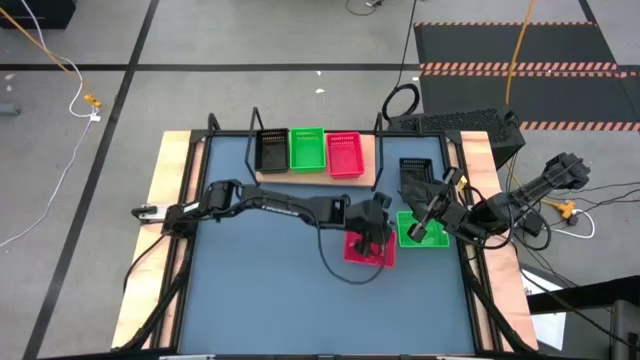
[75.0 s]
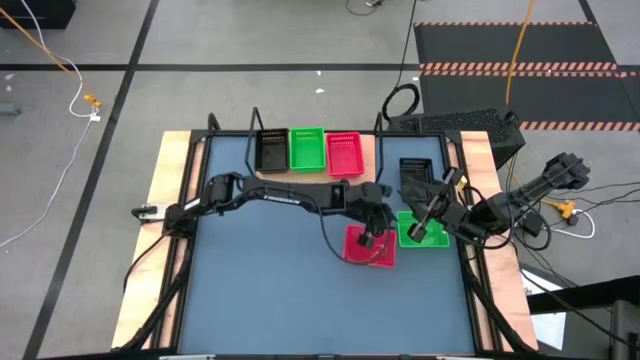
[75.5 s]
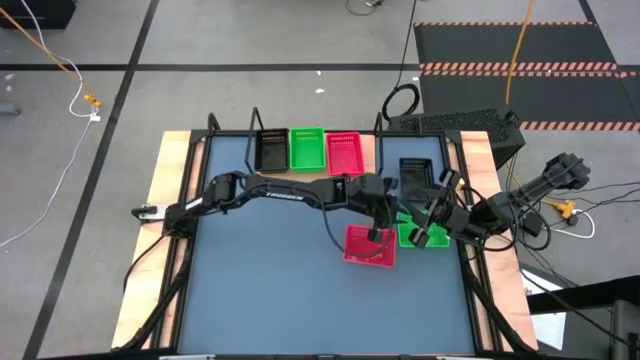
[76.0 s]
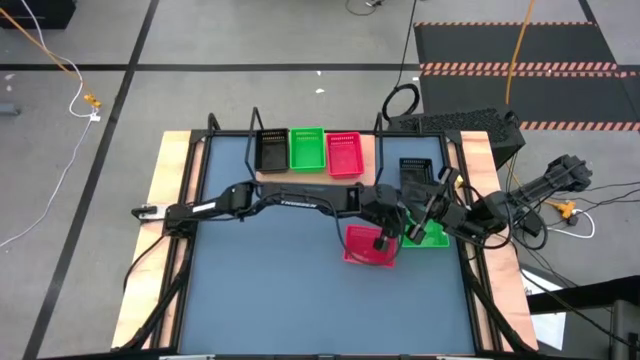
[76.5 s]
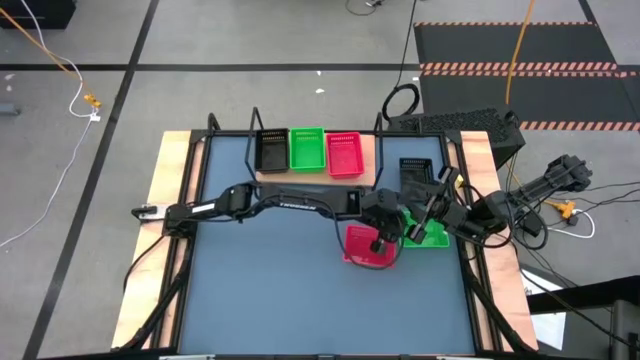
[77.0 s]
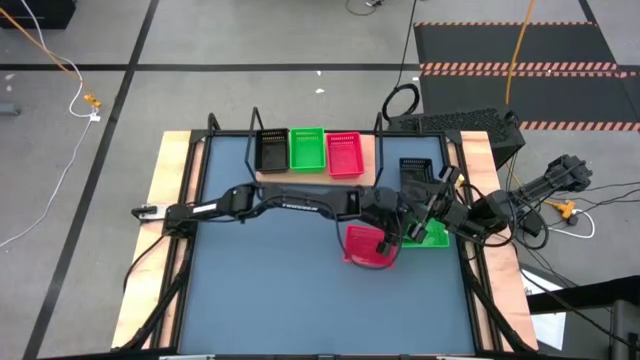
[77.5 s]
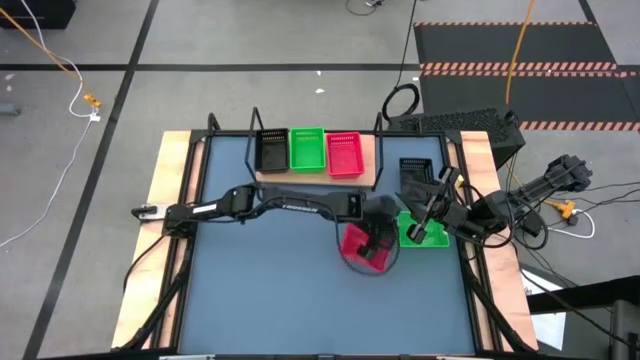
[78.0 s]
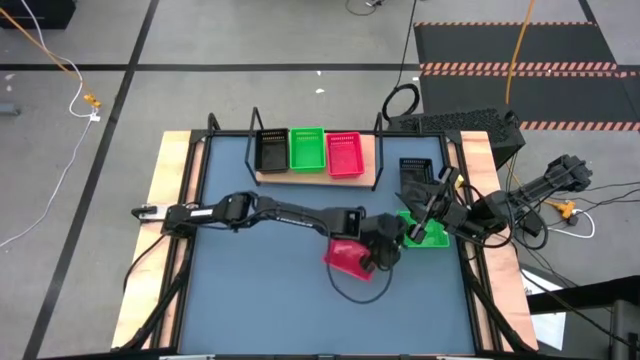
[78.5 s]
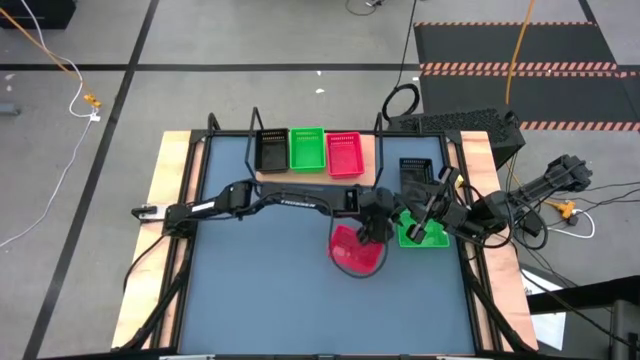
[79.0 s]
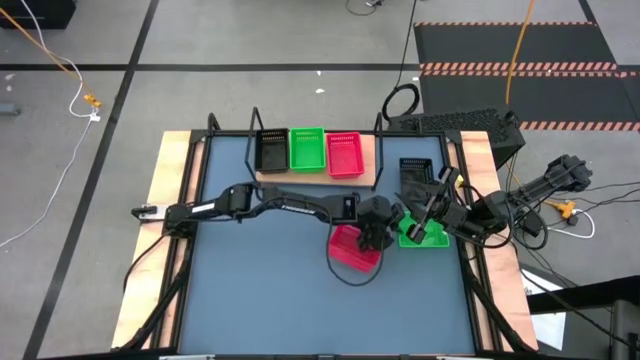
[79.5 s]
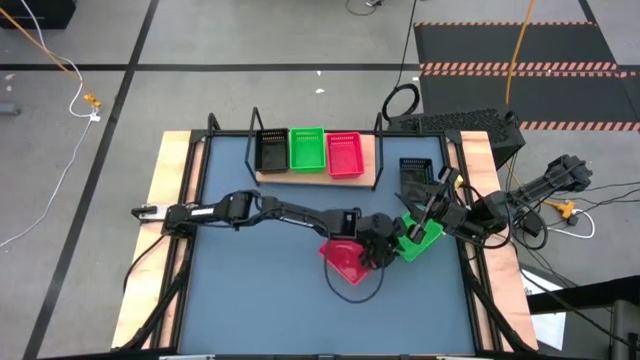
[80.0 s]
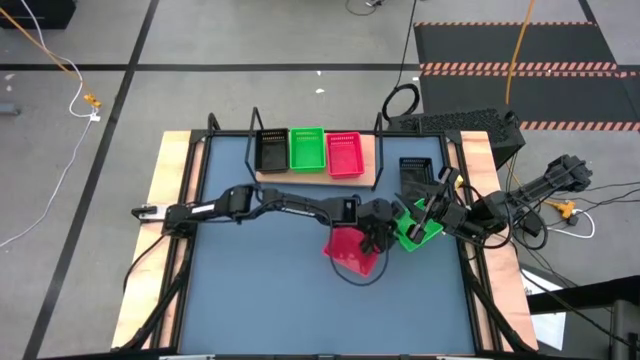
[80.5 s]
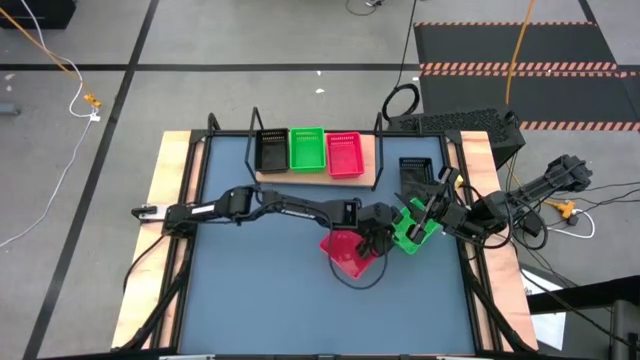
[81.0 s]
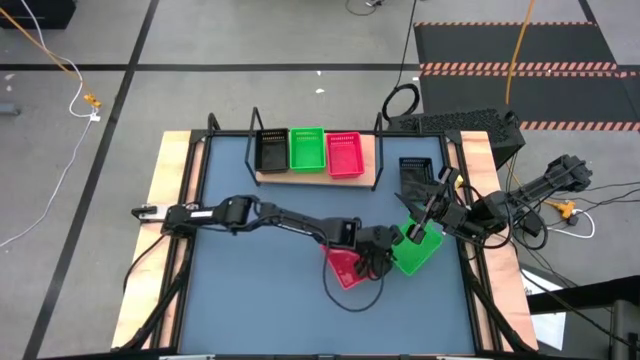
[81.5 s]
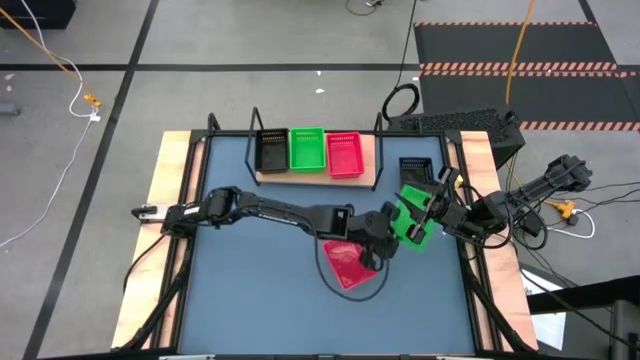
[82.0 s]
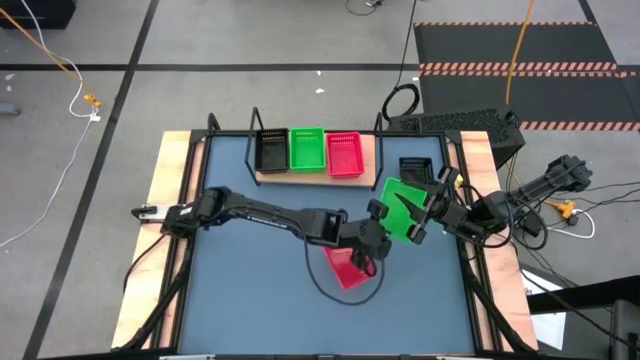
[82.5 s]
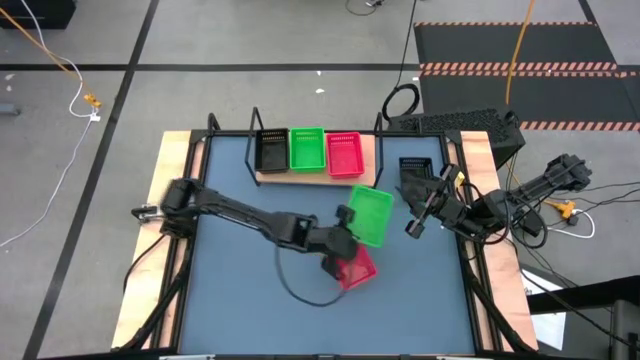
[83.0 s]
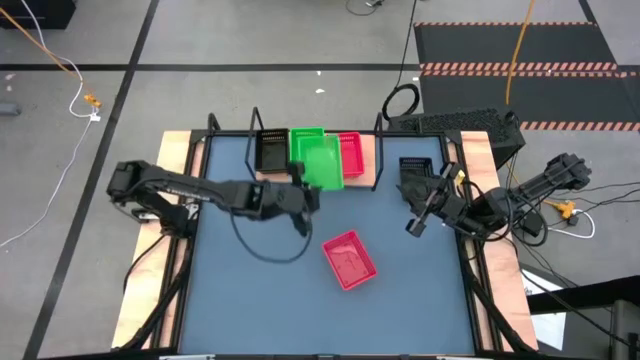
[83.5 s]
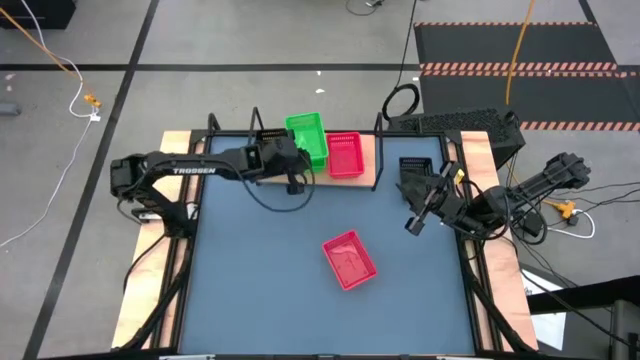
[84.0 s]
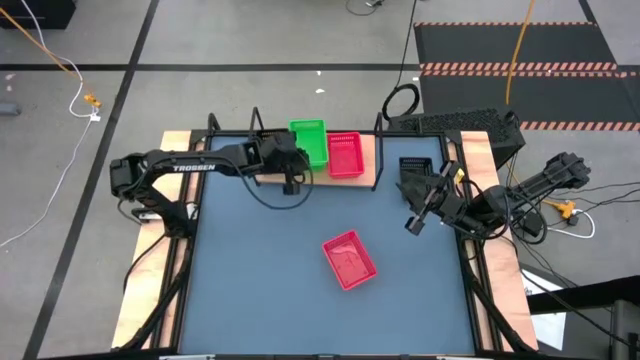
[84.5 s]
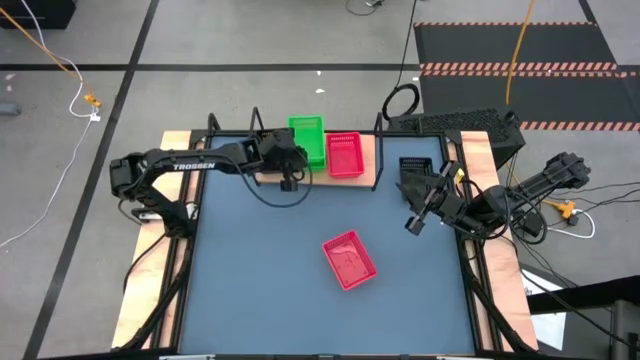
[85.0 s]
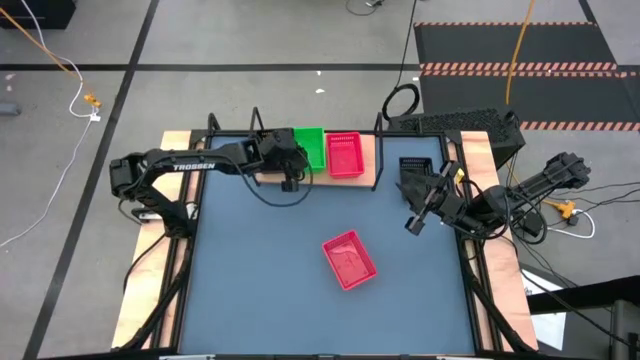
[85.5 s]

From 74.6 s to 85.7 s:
Task: Stack baskets on shelf by color
Stack the green bin on top of the green bins on the shelf

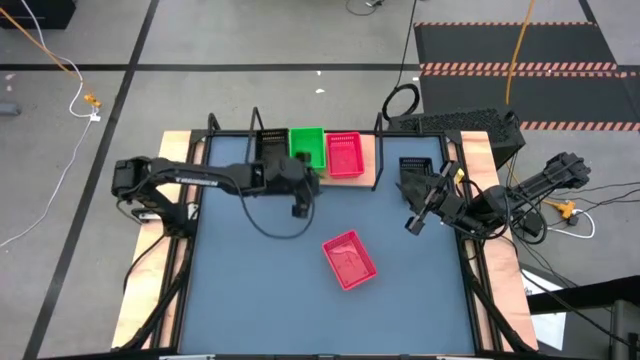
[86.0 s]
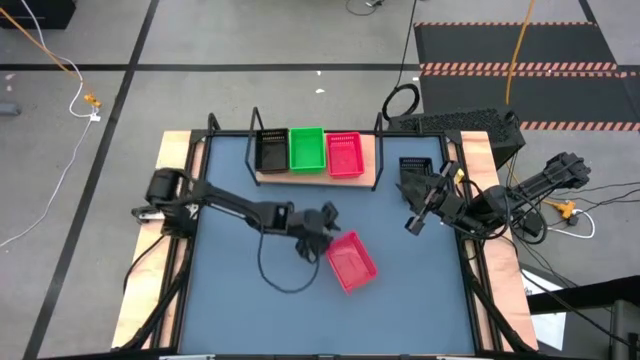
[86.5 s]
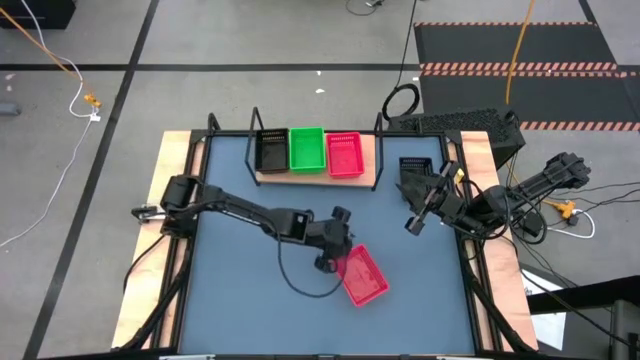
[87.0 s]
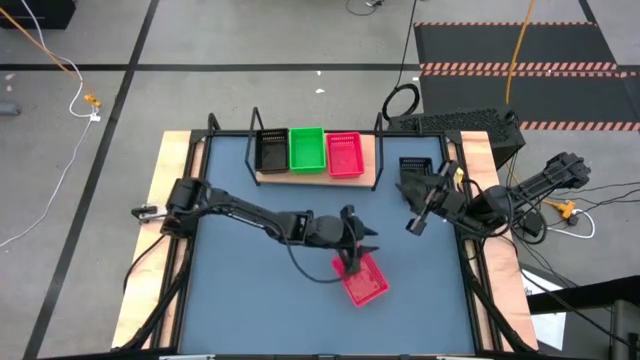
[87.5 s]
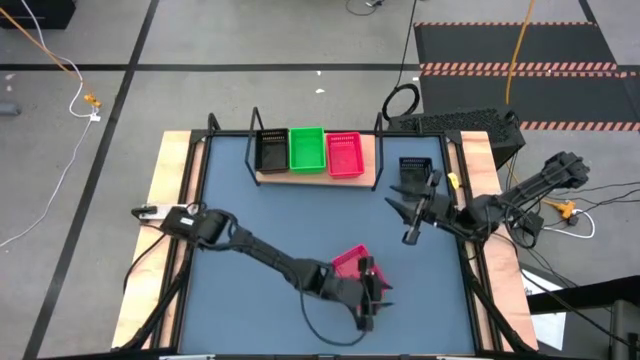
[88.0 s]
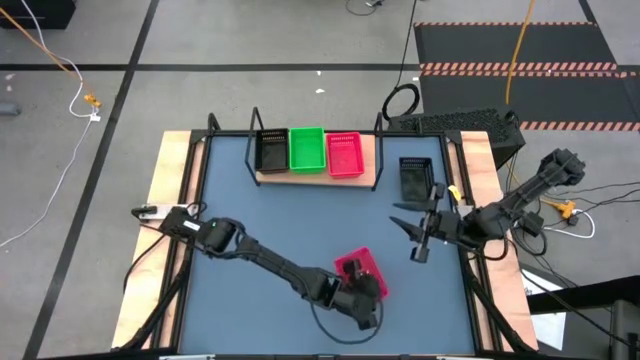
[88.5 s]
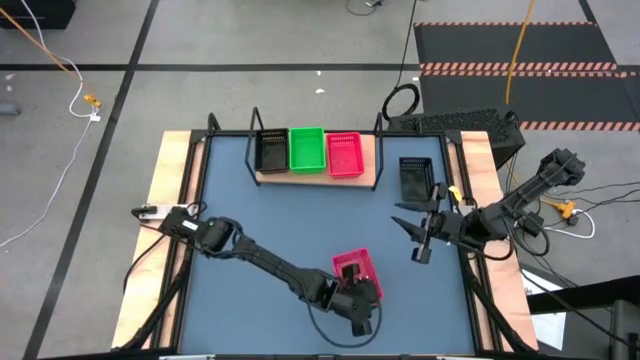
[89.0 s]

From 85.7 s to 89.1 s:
Stack the red bin on top of the red bins on the shelf

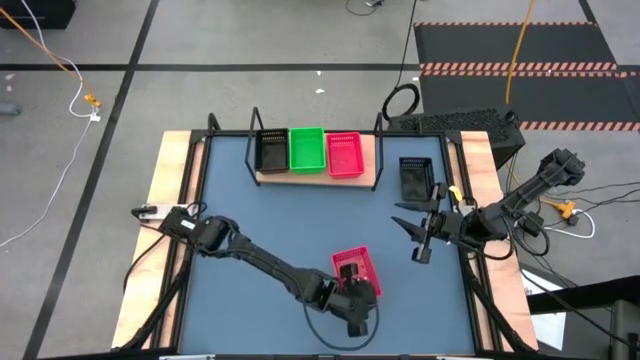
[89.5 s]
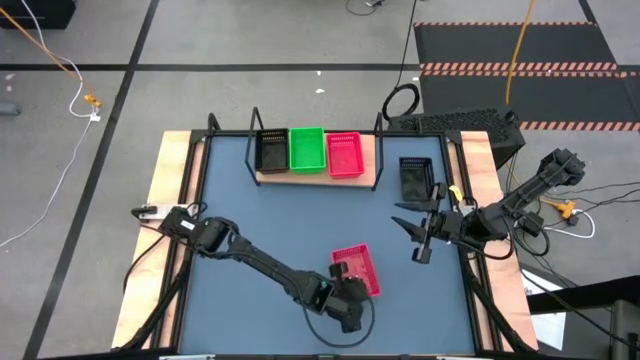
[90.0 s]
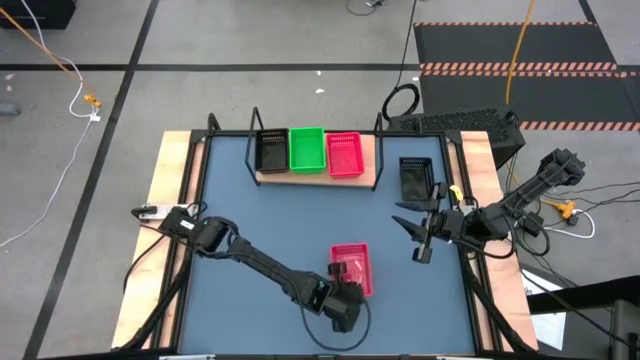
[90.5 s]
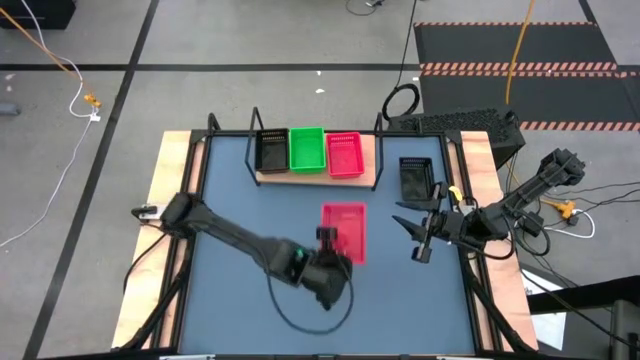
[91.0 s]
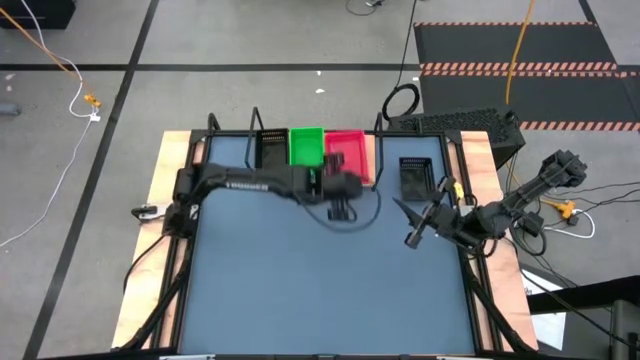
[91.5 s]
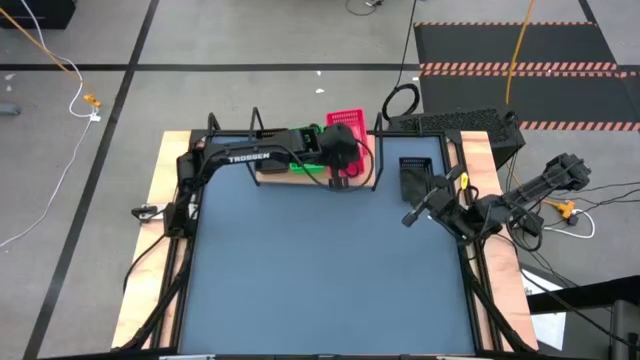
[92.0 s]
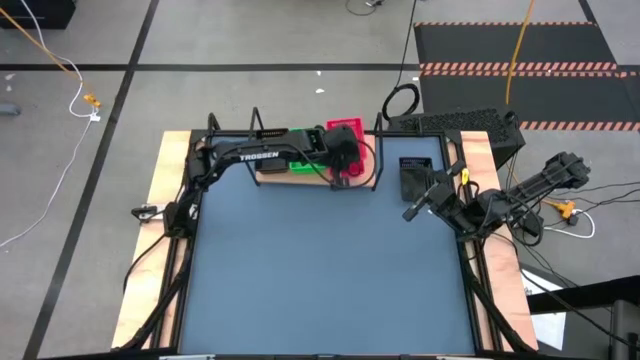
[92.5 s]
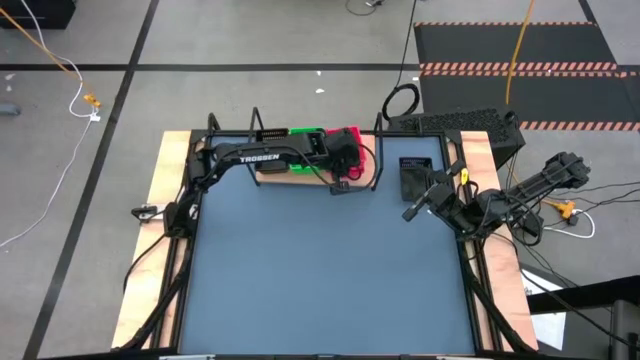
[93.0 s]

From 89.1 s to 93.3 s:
Stack the red bin on top of the red bins on the shelf

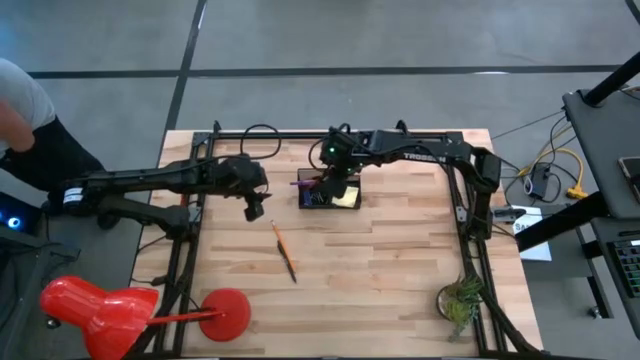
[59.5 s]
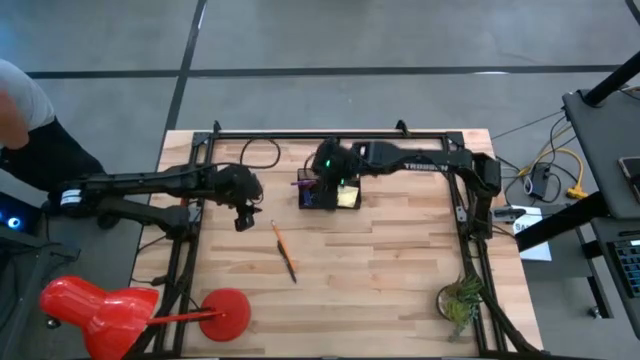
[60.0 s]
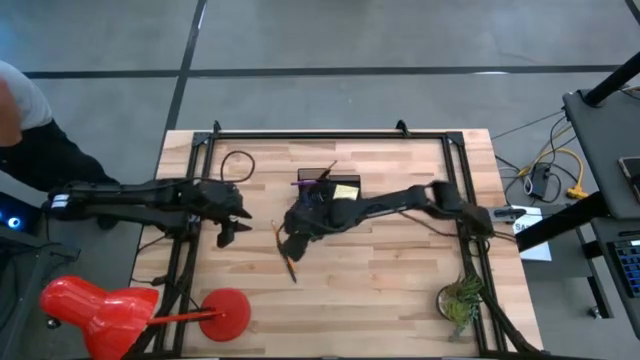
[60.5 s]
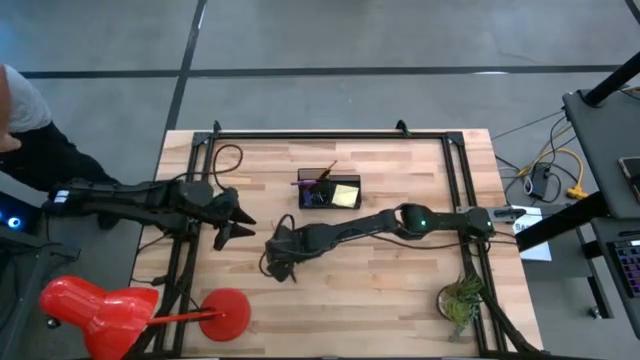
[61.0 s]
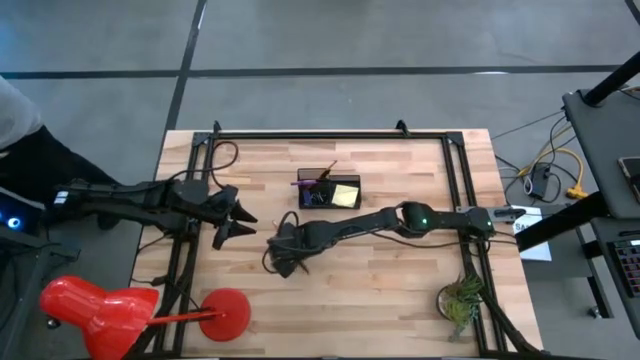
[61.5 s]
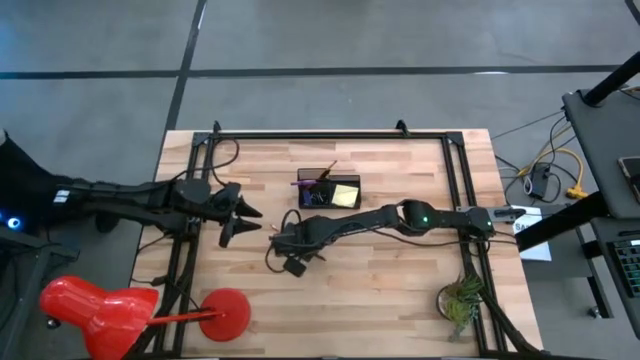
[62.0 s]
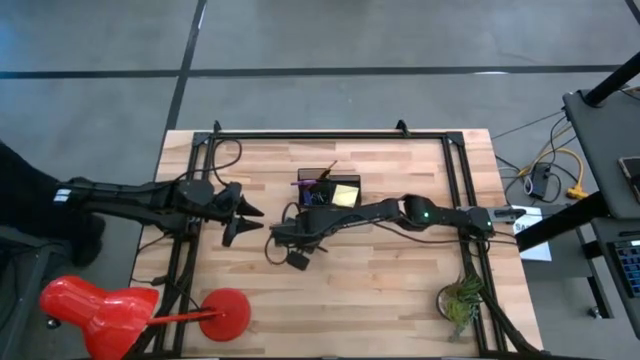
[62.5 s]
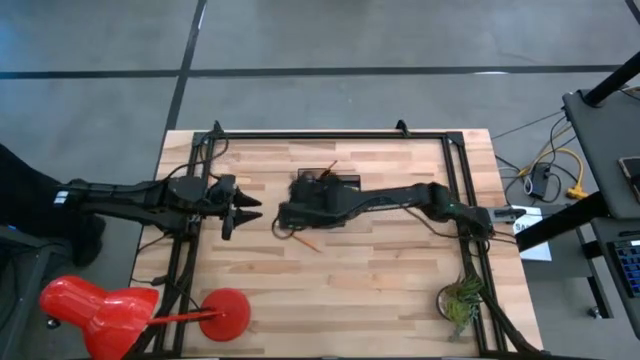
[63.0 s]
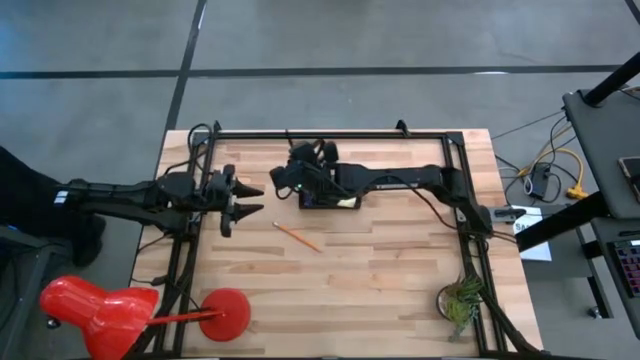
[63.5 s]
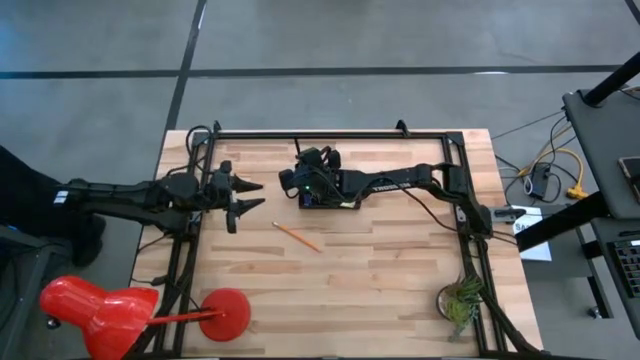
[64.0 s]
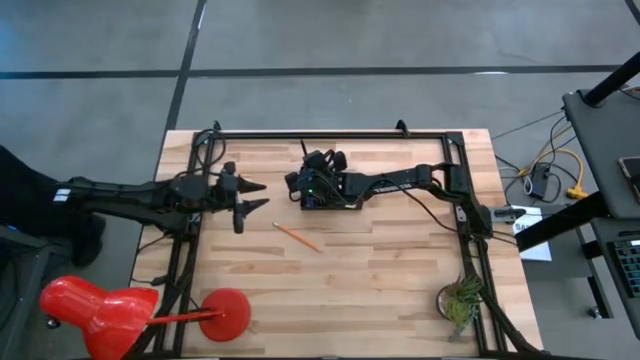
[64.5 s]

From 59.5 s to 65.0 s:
Task: Pick and place office supplies into organizer
Put the black ball pen into the black desk organizer
